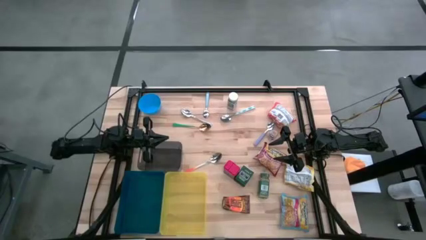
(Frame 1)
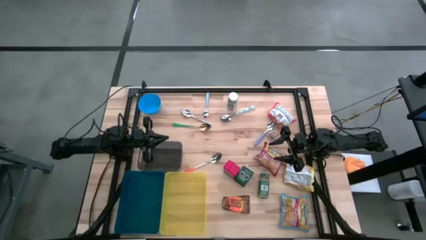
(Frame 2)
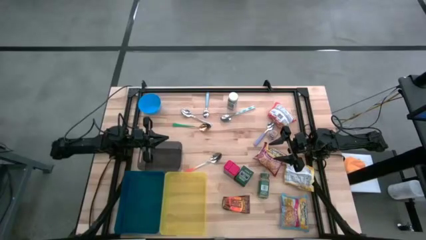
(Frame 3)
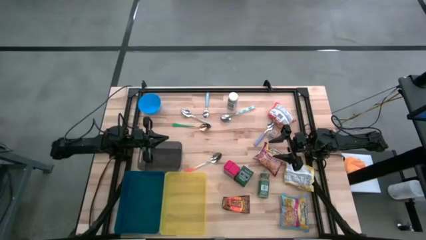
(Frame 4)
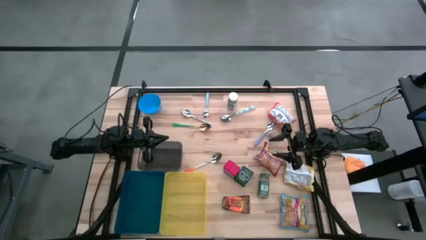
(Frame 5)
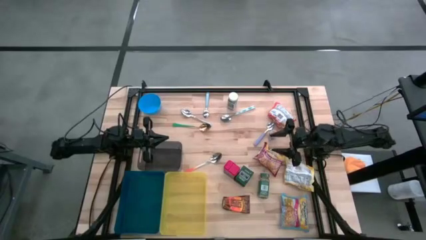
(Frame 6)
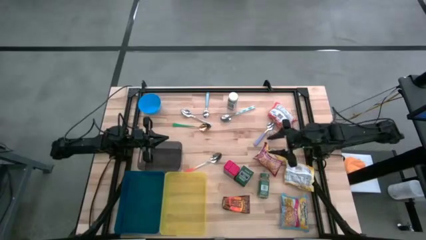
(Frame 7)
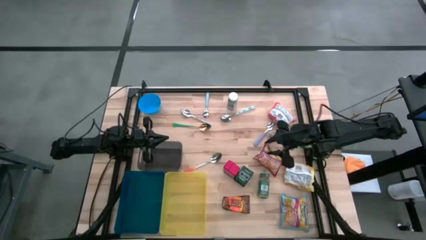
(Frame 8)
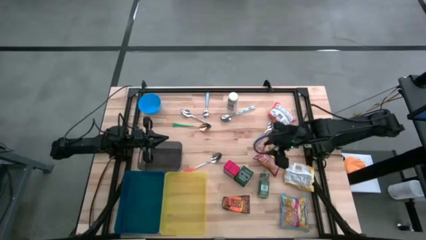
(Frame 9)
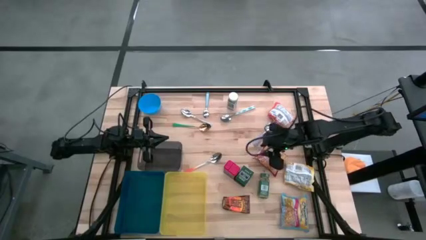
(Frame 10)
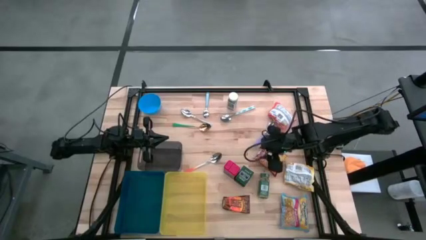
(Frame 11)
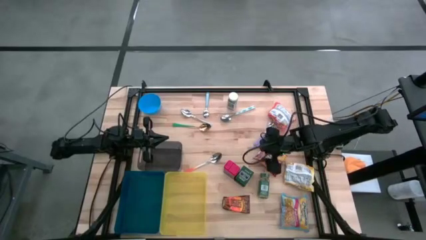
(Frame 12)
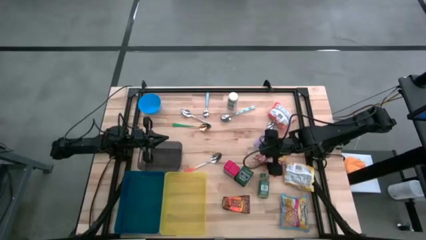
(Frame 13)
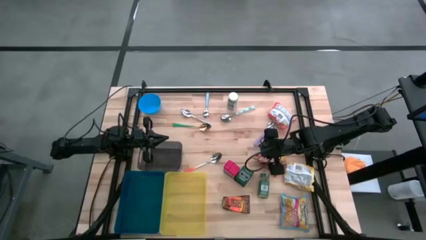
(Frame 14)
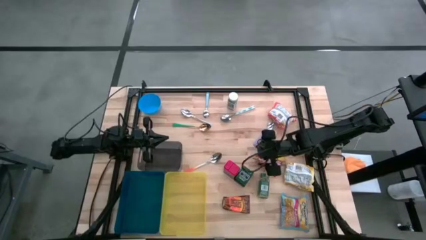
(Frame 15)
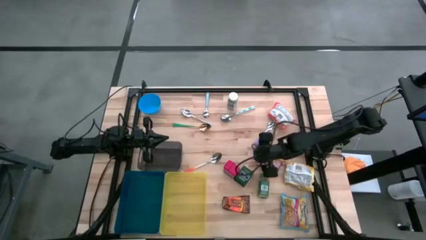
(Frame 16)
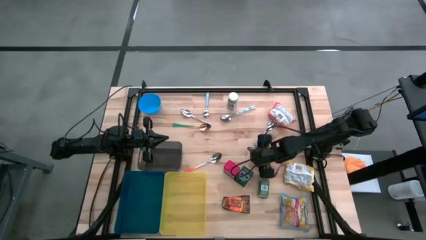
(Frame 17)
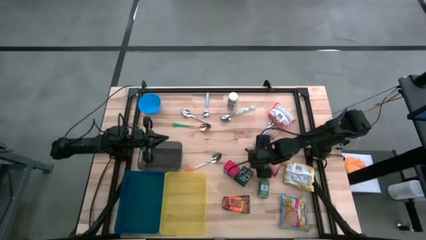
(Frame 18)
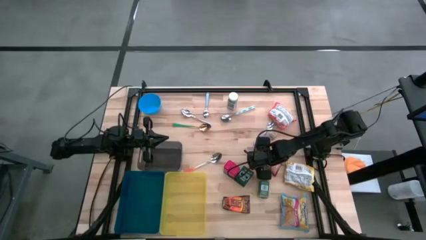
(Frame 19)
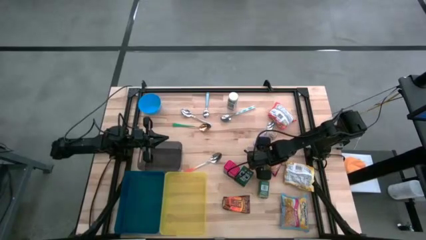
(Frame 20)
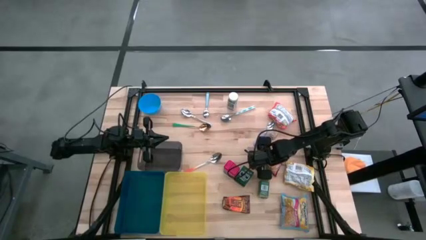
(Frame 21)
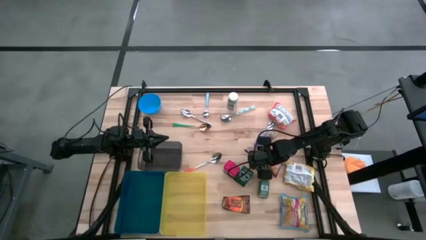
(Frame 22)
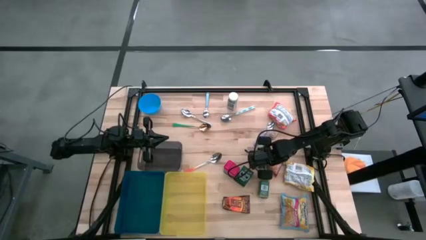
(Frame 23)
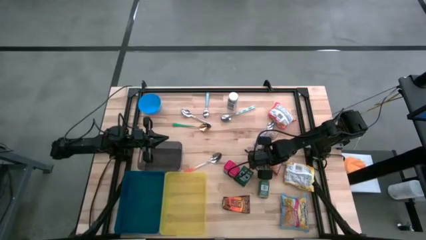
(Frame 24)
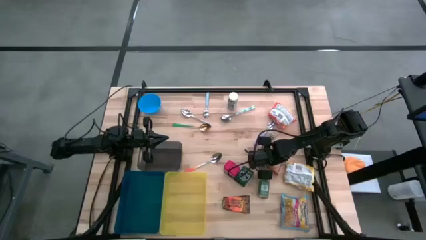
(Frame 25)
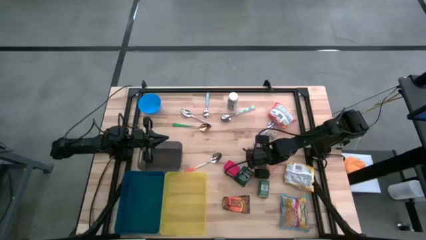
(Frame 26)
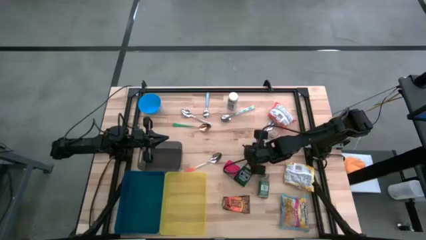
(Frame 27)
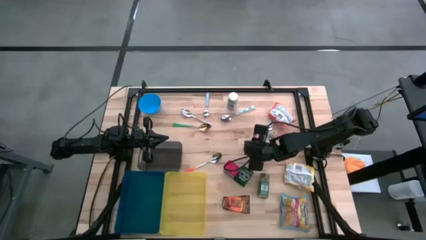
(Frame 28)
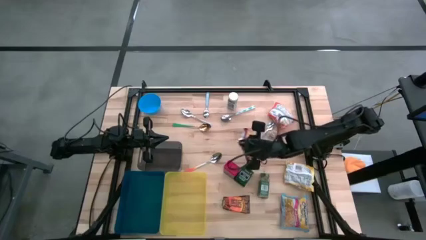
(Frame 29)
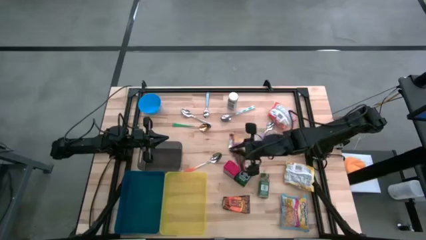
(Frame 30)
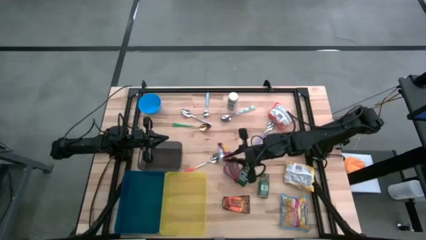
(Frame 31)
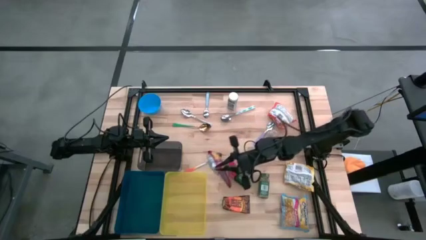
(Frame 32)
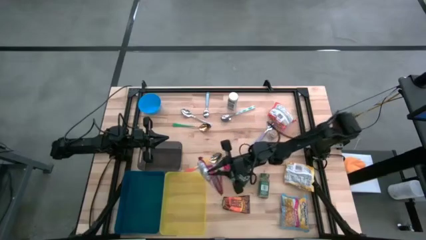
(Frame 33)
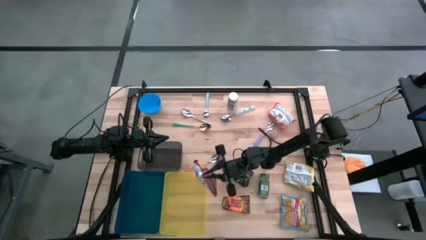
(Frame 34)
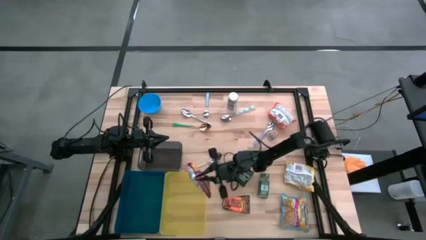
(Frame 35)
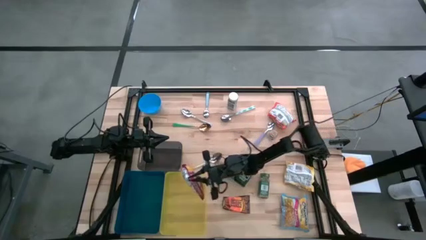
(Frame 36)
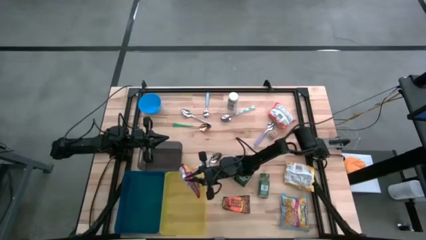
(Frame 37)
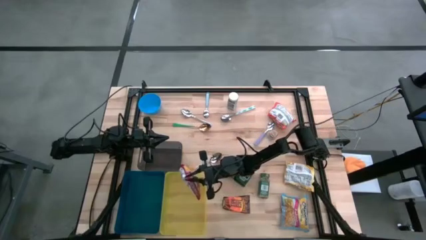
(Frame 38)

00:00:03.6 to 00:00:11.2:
Put the red noodle pack into the yellow bin

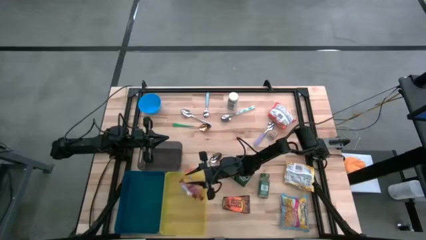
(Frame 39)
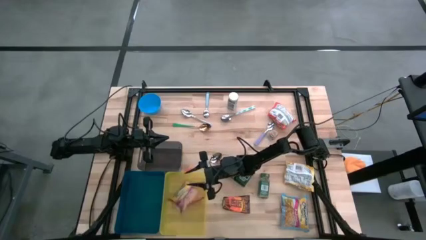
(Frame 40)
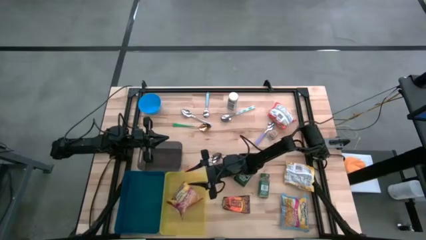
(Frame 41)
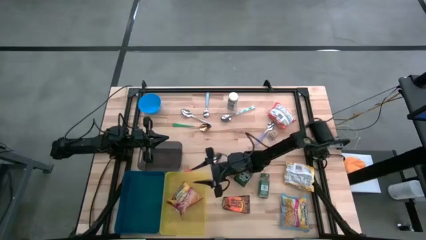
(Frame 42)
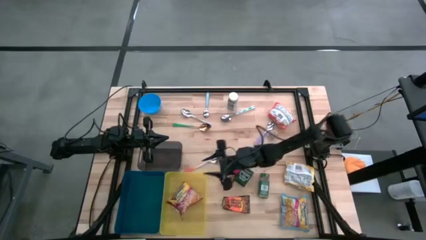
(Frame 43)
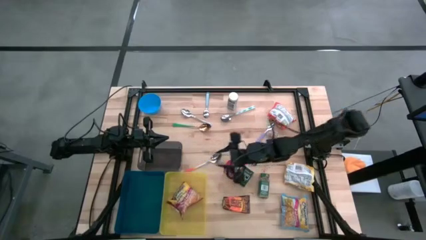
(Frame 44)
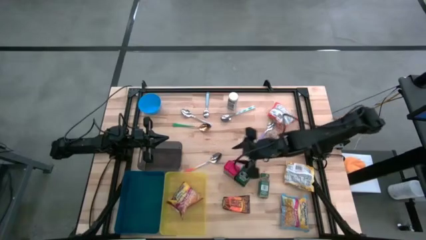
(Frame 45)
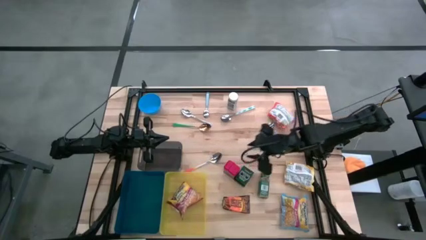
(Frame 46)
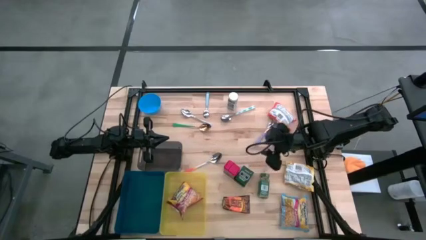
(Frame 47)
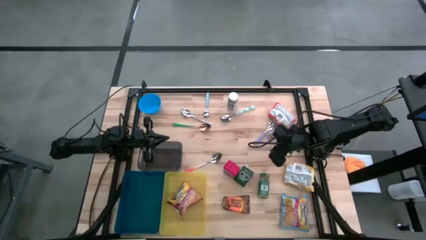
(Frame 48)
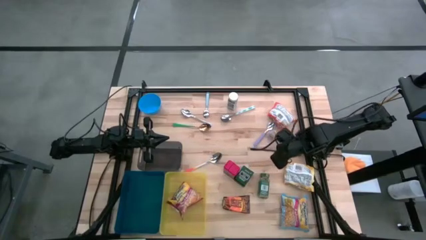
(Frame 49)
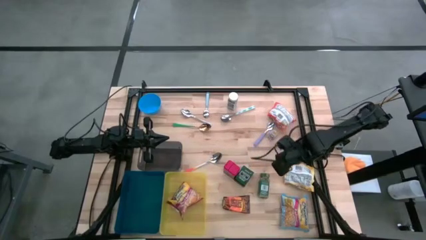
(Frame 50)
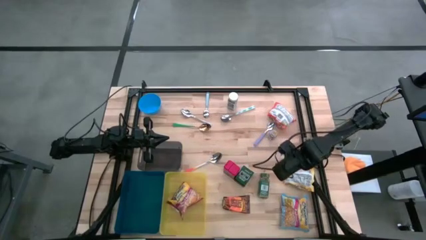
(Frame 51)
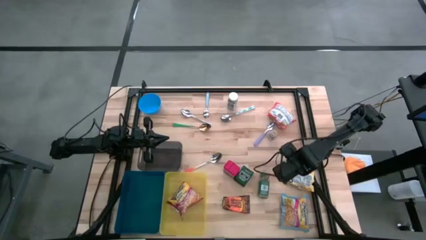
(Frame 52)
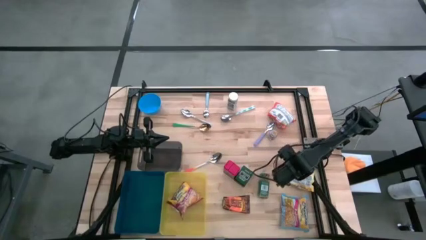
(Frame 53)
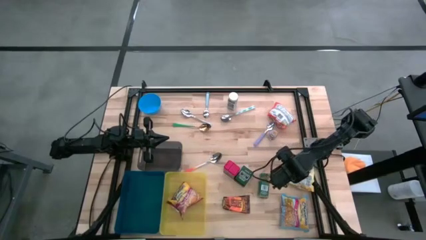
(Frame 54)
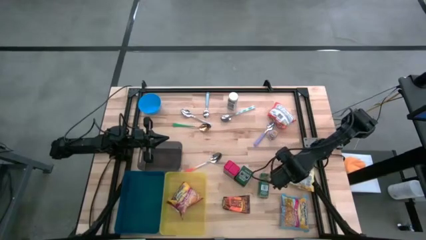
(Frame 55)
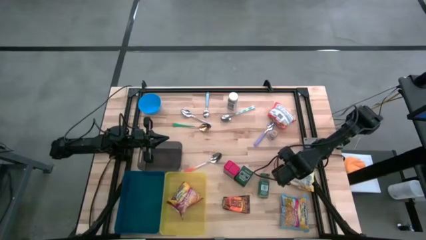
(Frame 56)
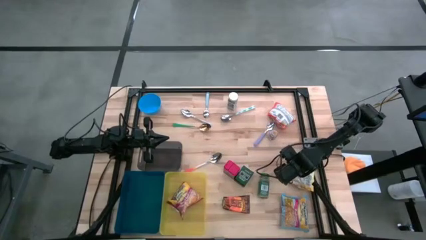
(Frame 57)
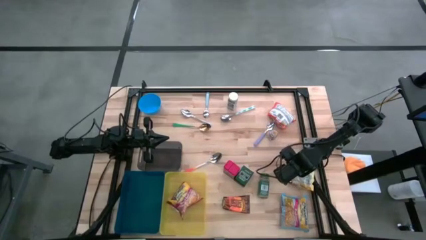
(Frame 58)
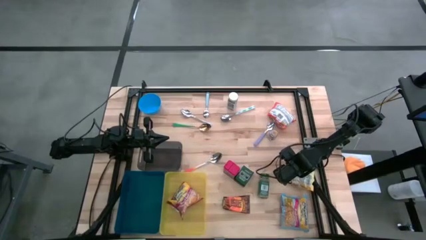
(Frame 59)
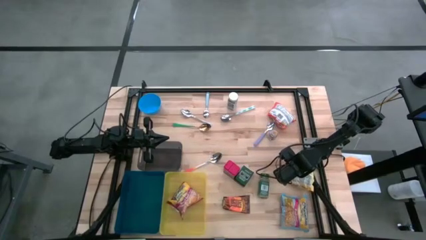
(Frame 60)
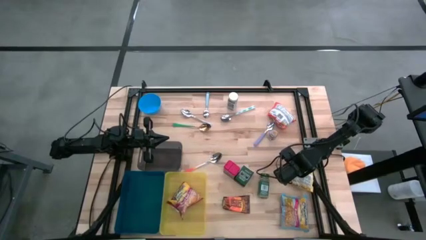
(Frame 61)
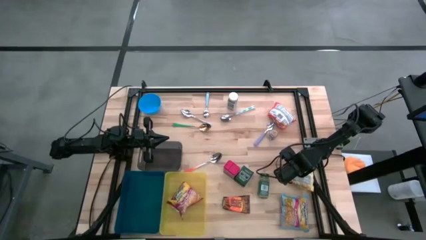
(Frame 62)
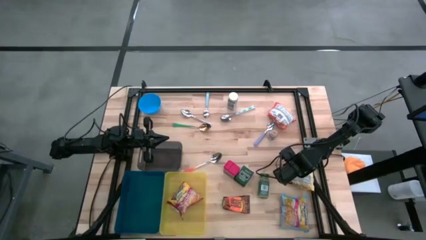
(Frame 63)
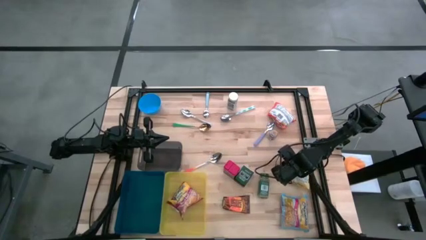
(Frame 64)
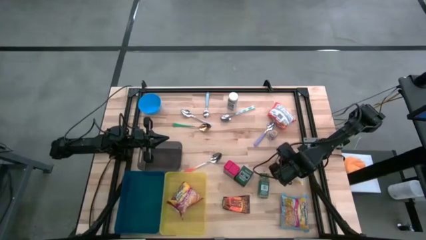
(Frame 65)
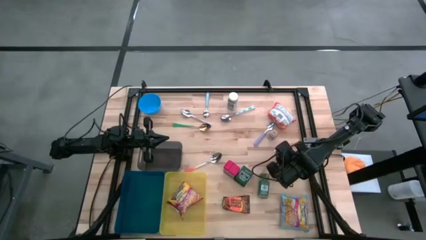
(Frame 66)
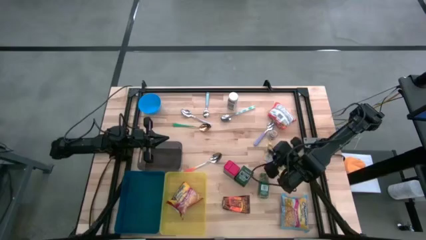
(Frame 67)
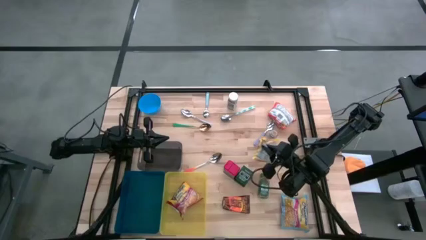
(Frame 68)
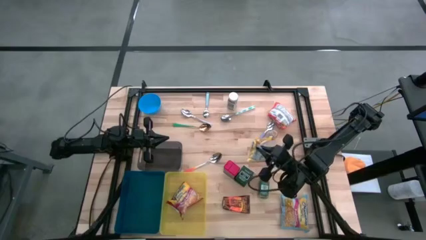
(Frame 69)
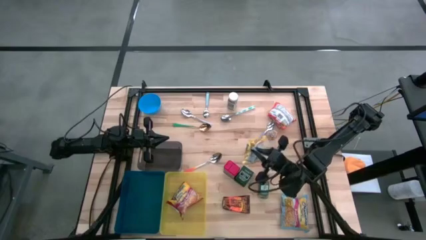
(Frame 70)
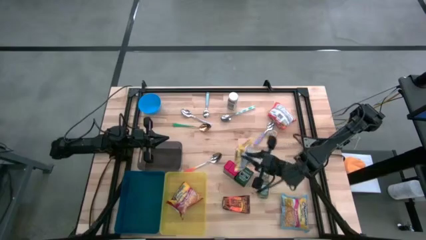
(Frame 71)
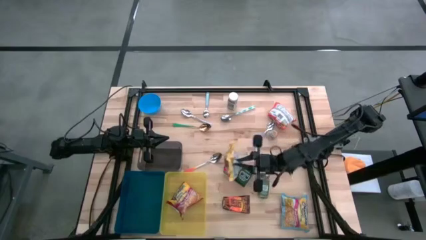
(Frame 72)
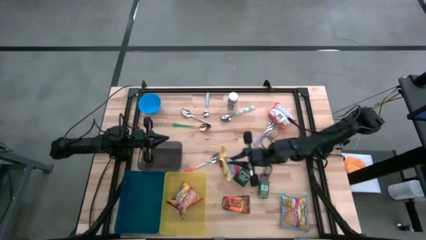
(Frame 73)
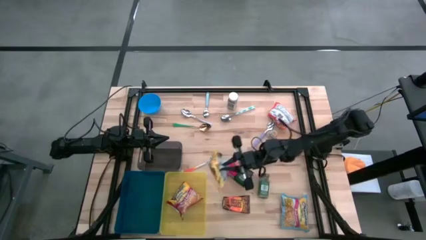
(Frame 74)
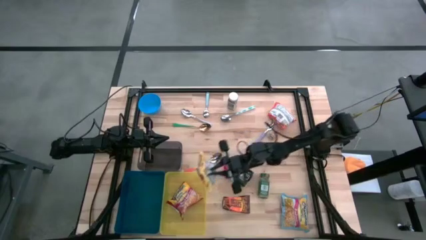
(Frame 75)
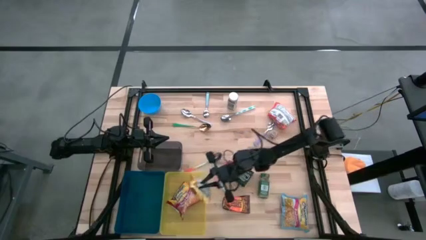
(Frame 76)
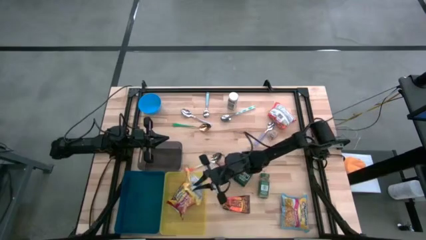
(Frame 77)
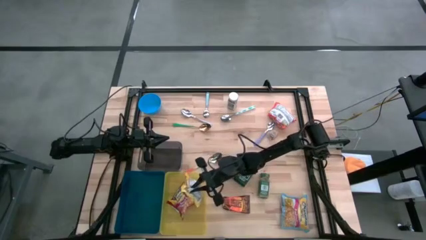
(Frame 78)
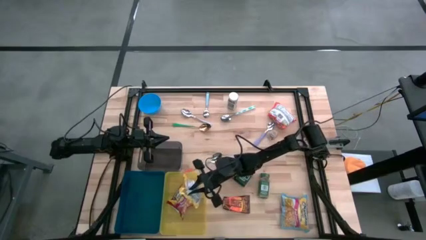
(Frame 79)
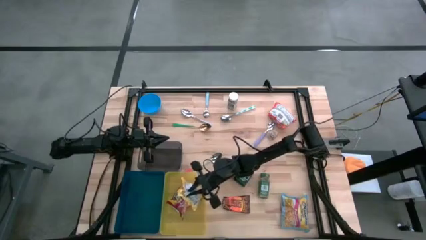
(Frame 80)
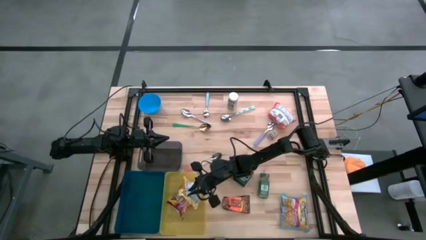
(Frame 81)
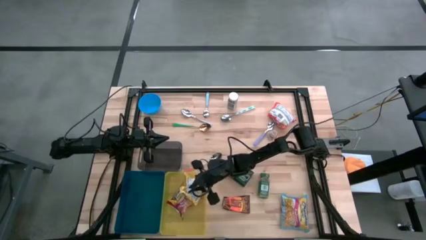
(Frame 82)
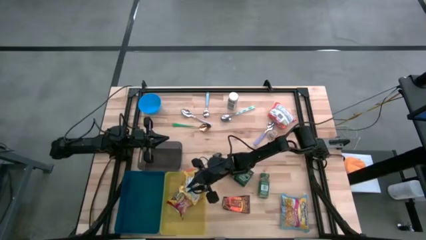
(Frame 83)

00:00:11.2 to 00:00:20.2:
Put the yellow noodle pack into the yellow bin
